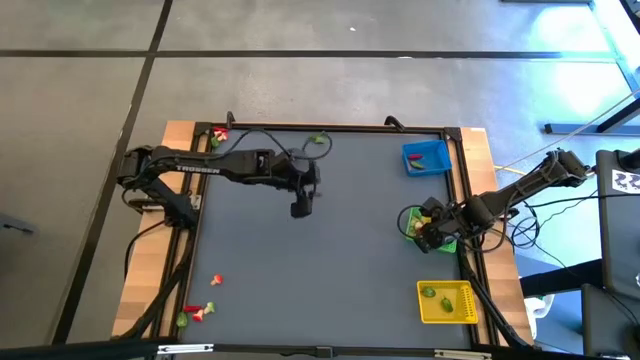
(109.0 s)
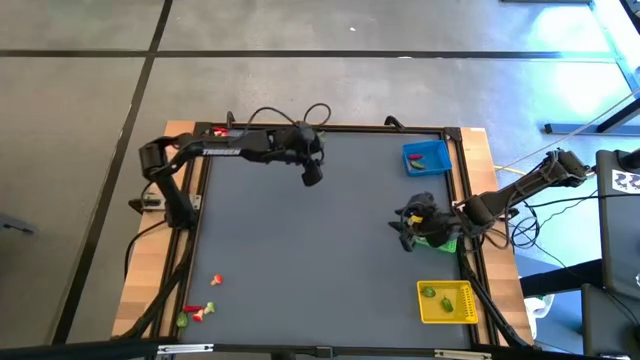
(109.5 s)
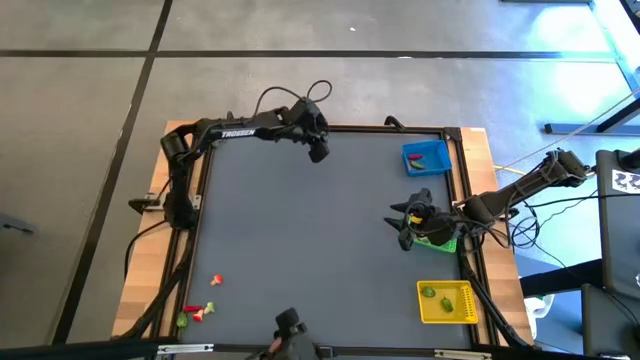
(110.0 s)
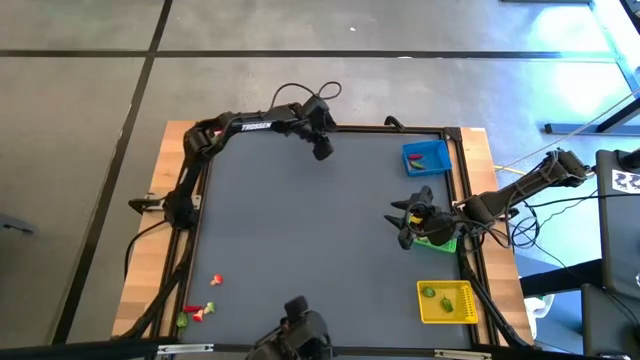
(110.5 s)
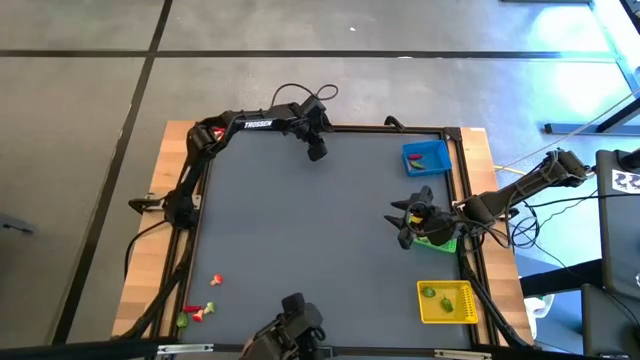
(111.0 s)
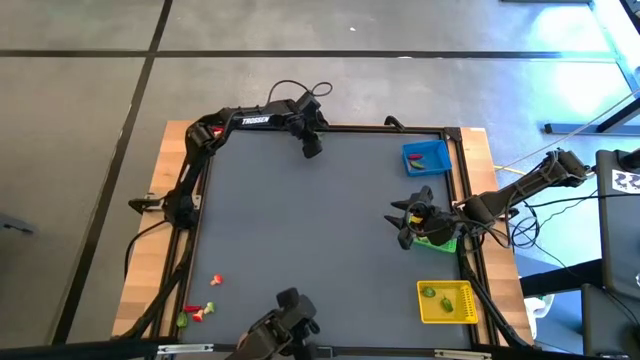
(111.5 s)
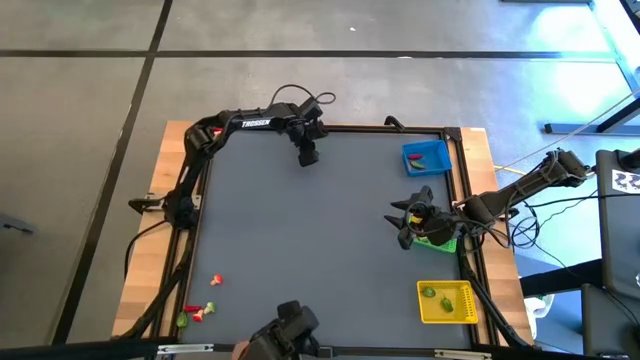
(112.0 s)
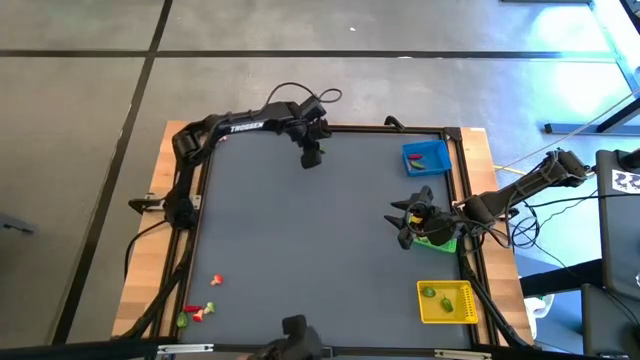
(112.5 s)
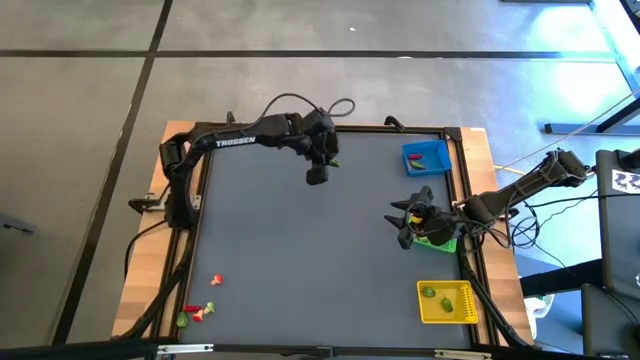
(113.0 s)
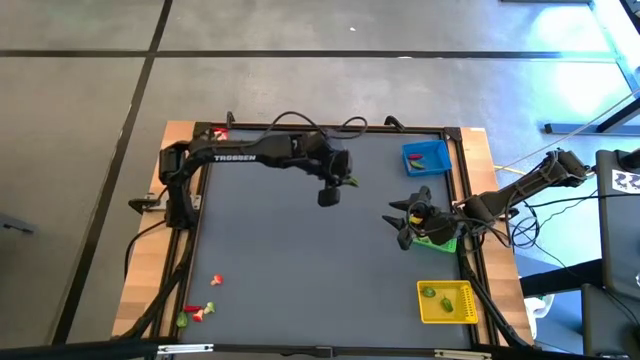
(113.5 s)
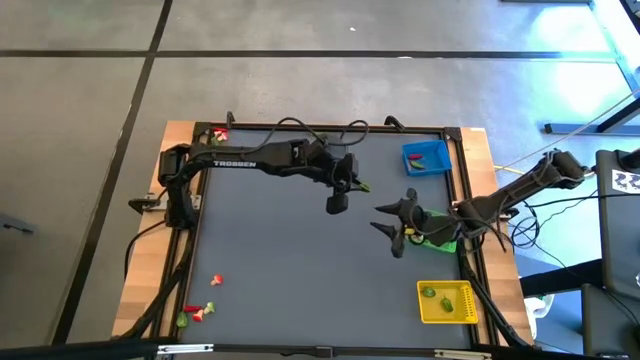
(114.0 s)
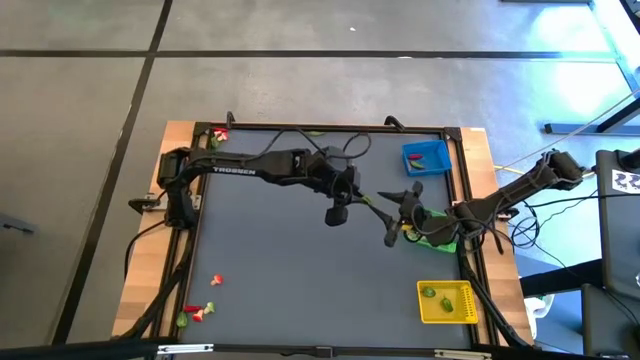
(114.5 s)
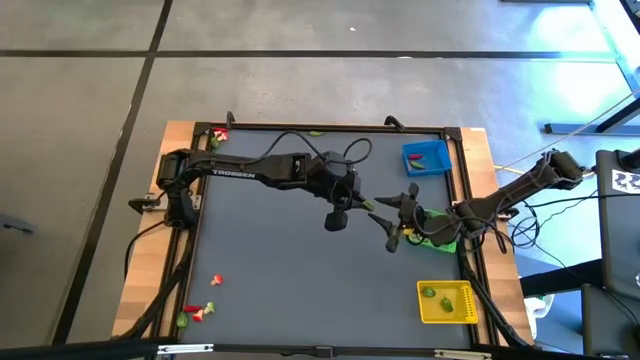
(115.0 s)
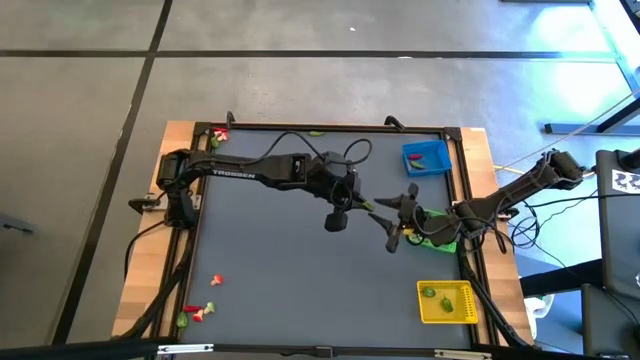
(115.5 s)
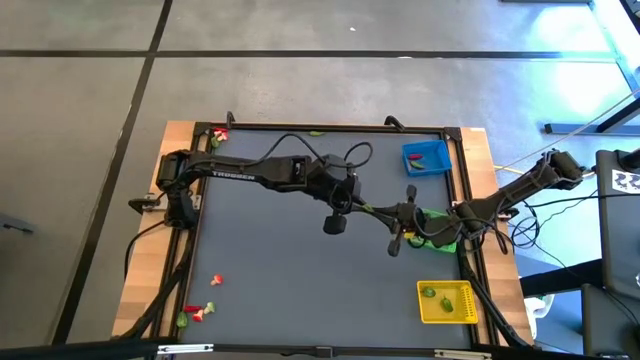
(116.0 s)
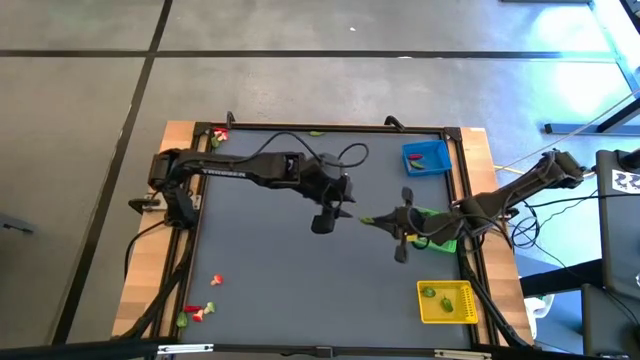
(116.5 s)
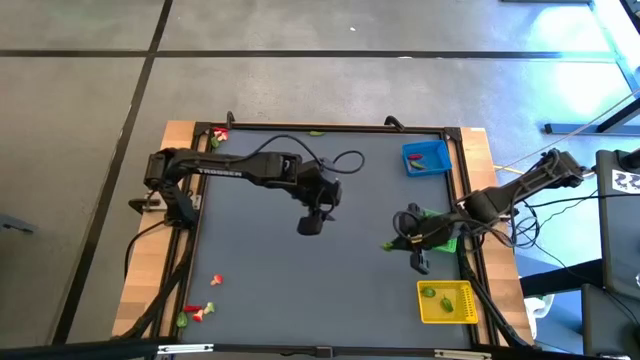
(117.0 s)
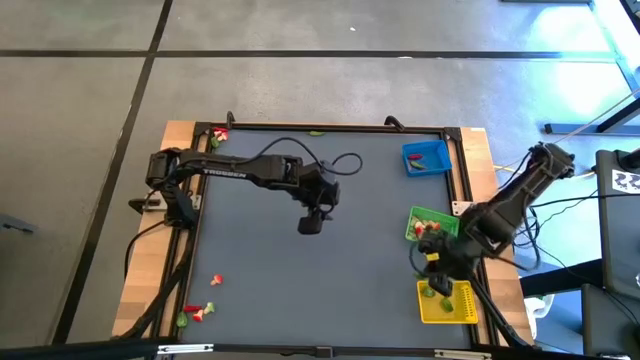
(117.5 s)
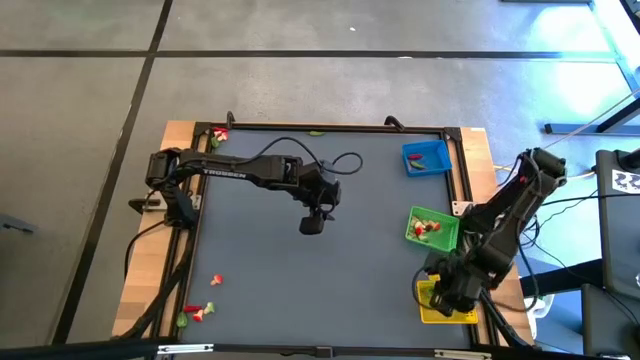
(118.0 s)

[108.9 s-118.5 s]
Task: Sort produce into baskets
Put the capsicum into the yellow basket

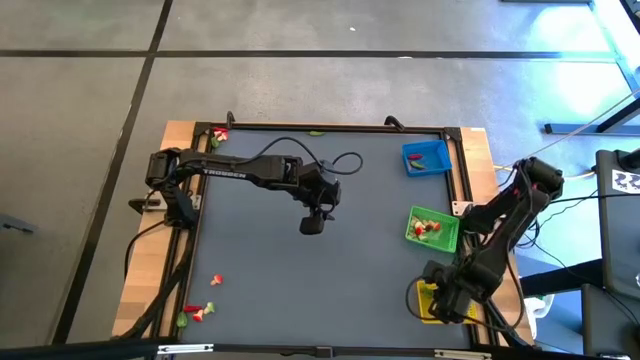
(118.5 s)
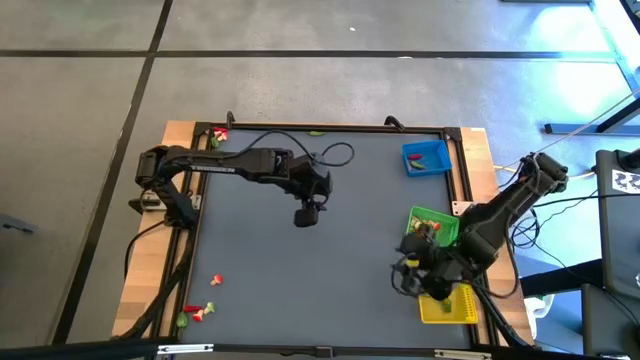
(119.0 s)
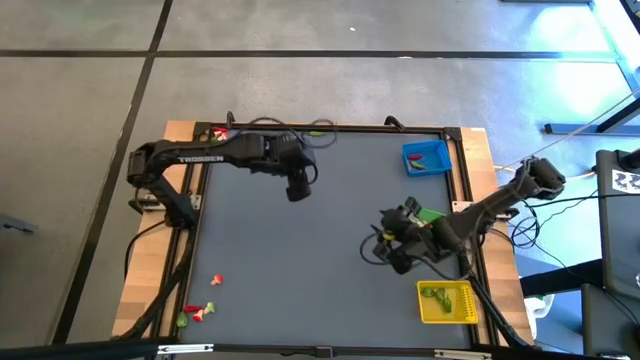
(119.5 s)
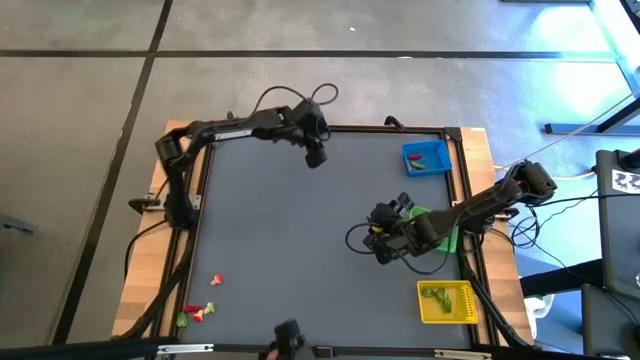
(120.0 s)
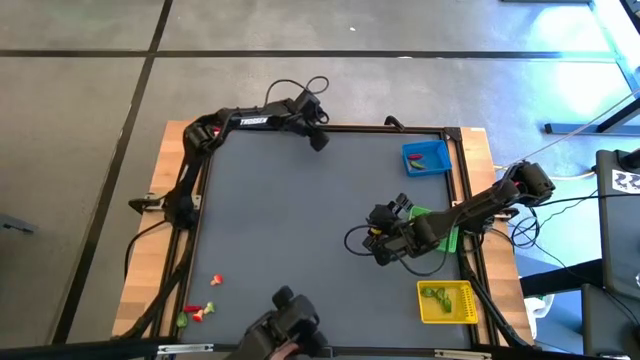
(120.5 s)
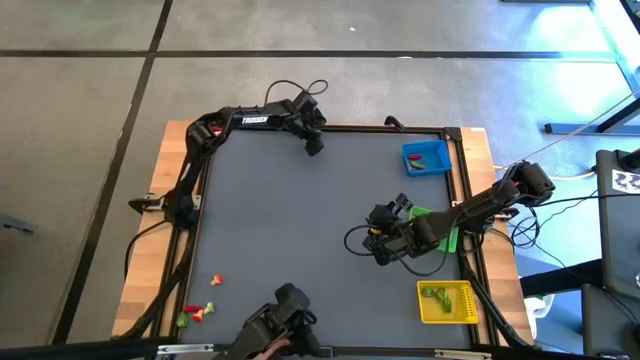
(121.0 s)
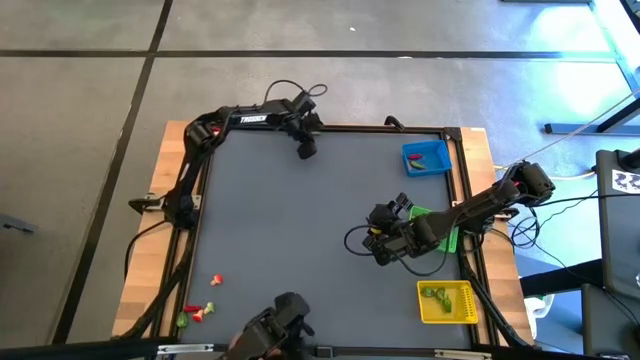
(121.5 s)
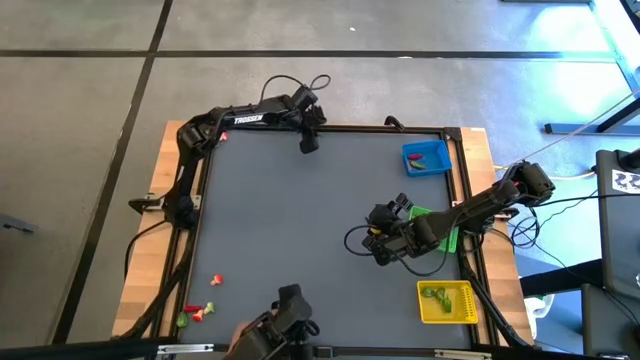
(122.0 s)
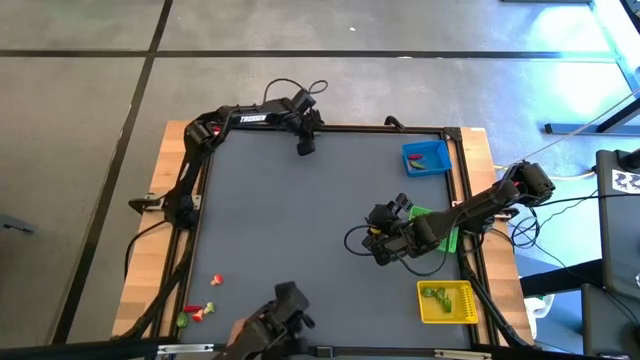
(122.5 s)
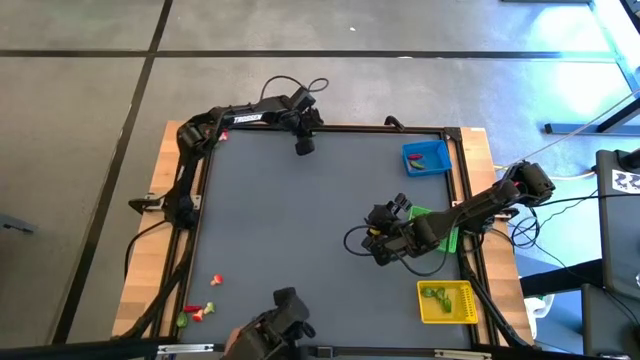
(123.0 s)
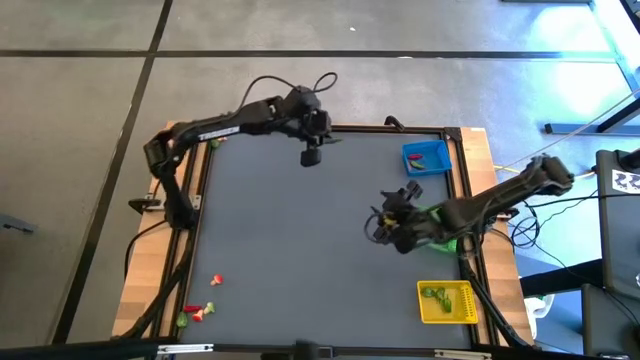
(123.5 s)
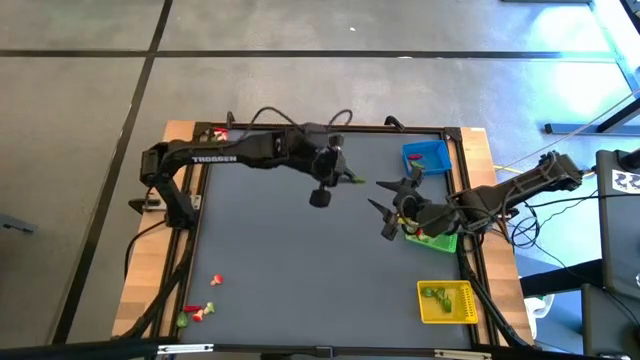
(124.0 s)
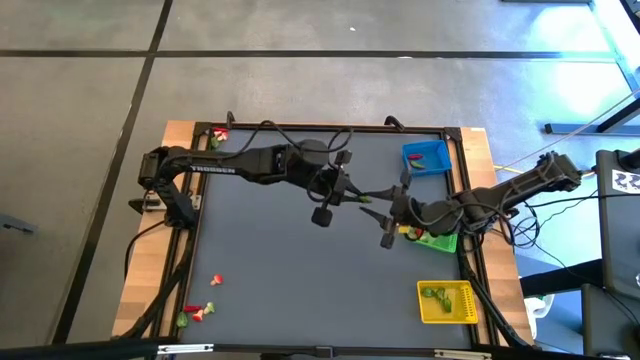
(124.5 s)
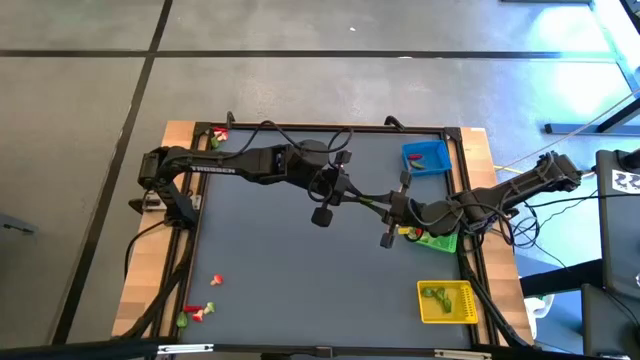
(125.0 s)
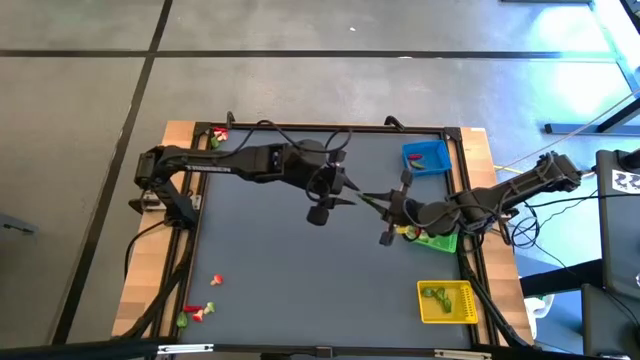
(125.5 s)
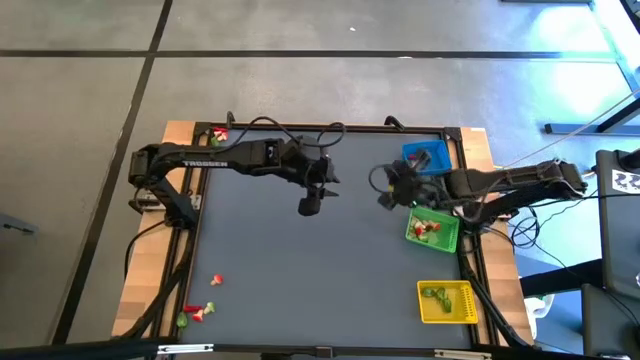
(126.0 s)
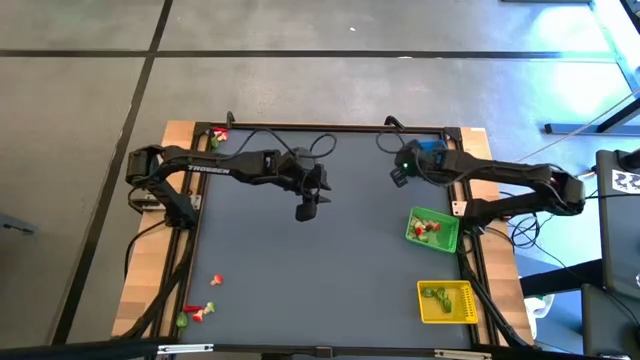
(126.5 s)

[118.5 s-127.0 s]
Put the green chili pepper into the blue basket

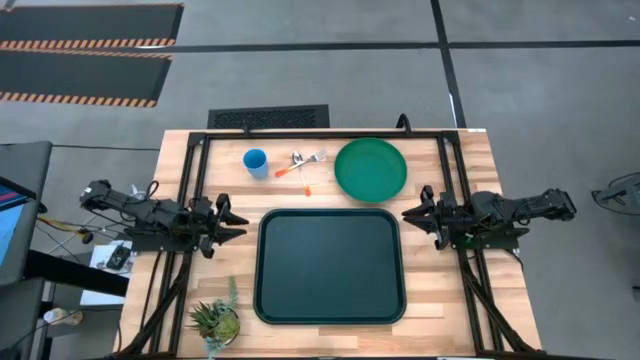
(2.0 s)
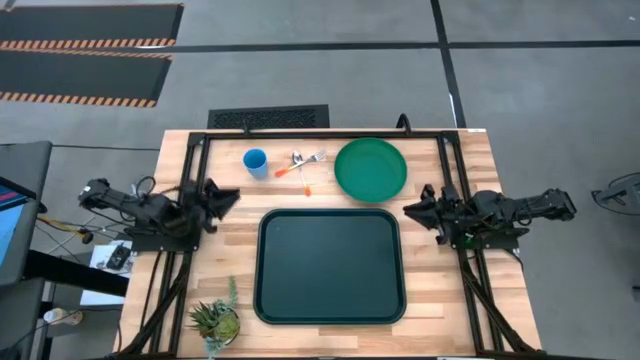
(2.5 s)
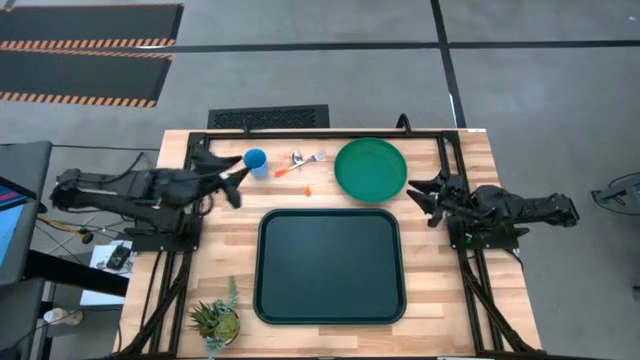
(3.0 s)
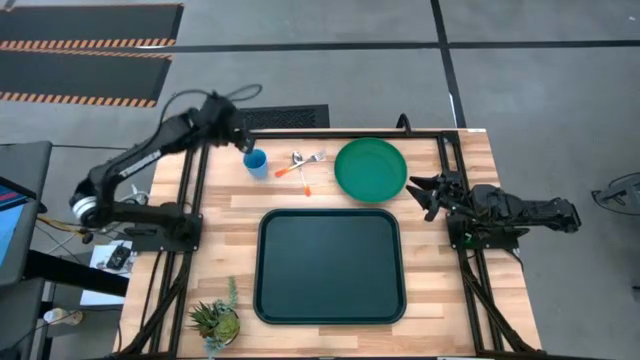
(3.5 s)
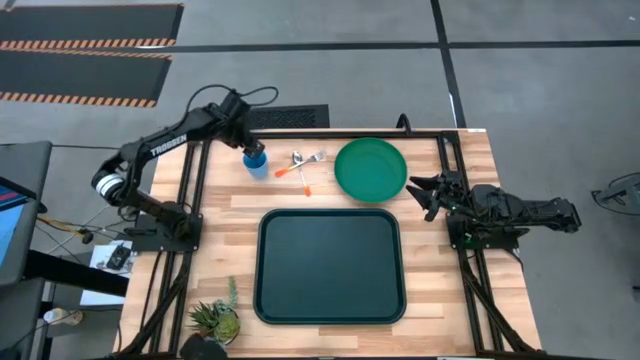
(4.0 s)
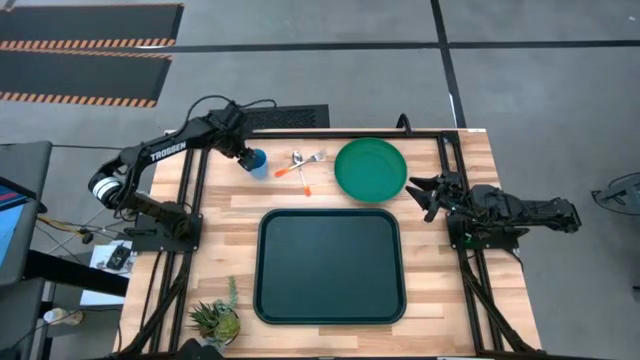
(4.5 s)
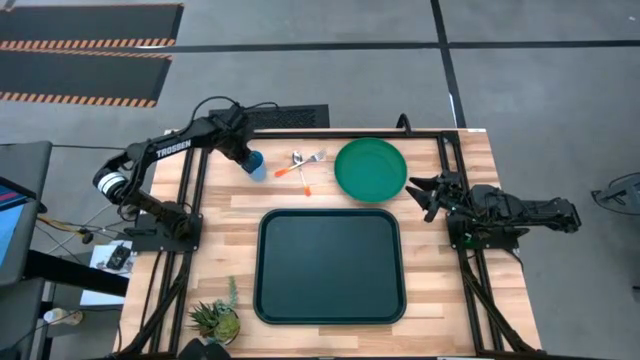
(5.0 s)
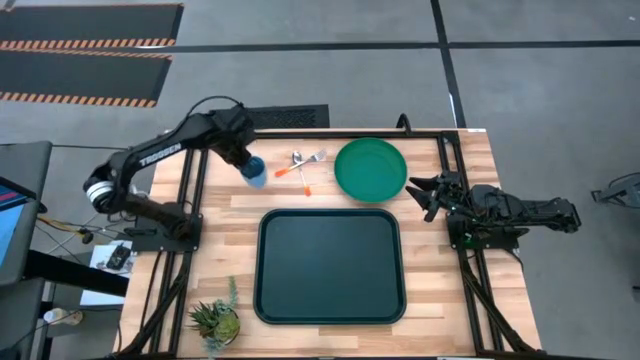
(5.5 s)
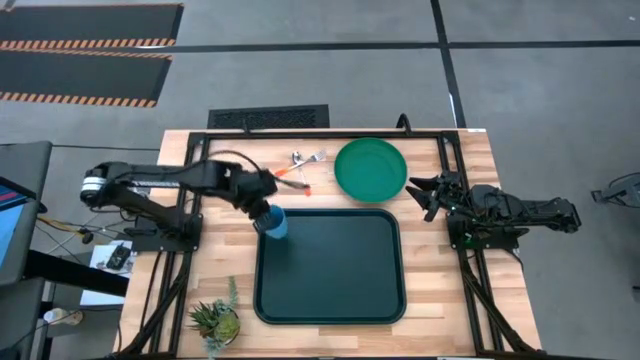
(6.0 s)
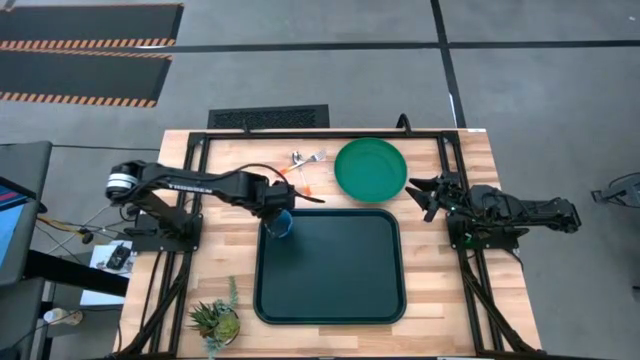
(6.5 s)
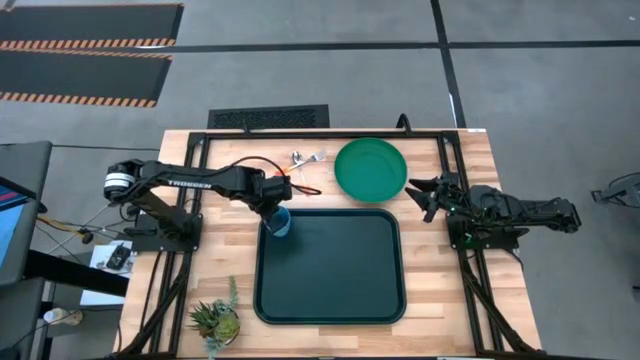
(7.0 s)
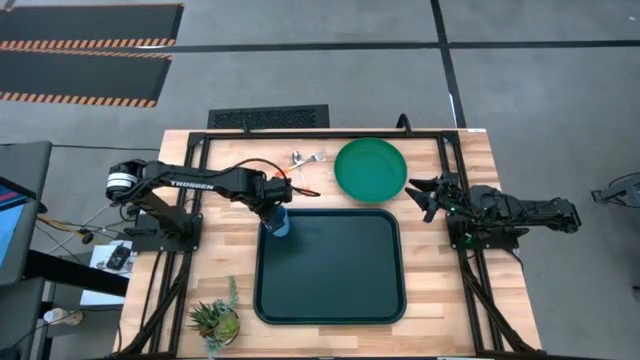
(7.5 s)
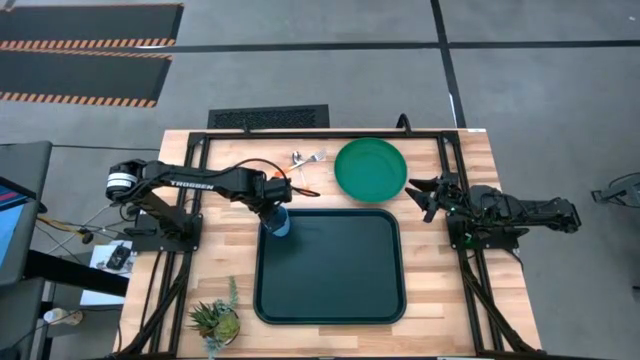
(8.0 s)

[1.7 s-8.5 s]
Task: Pick and place plate/cup/fork/spoon on tray
Put the blue cup on the black tray
